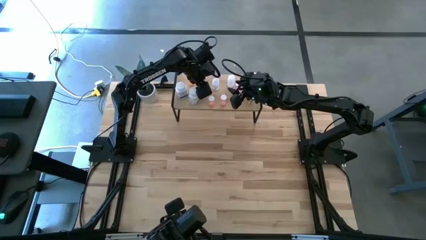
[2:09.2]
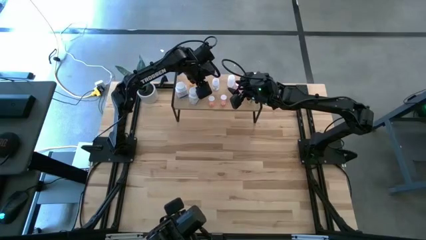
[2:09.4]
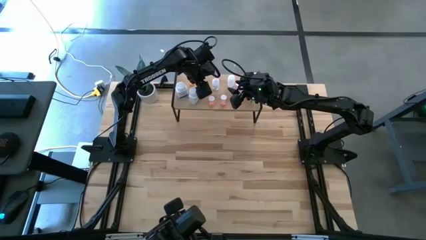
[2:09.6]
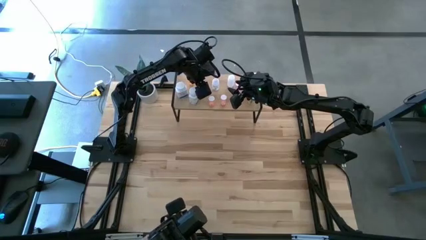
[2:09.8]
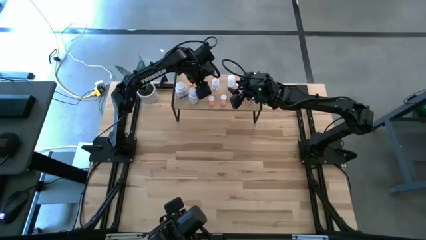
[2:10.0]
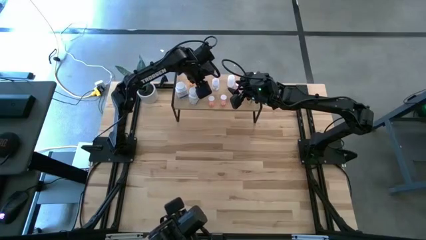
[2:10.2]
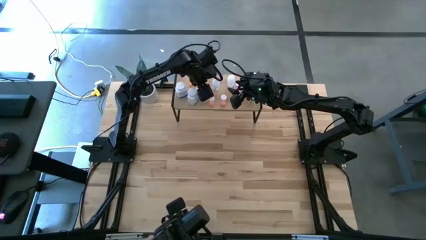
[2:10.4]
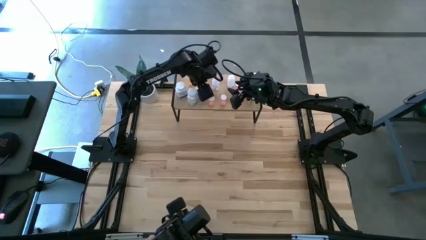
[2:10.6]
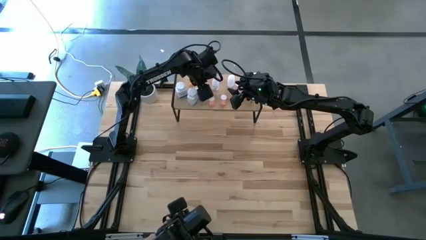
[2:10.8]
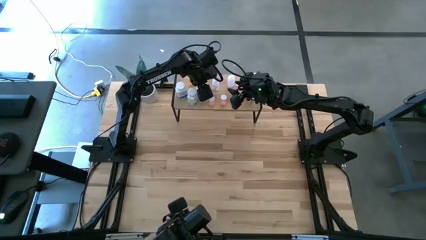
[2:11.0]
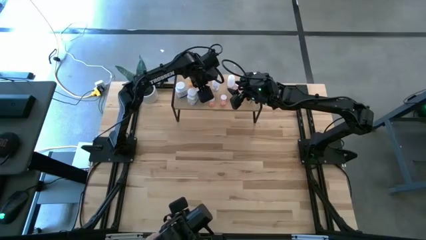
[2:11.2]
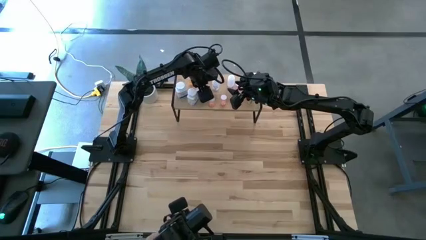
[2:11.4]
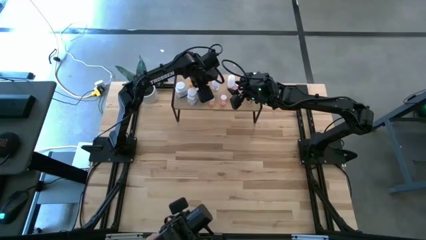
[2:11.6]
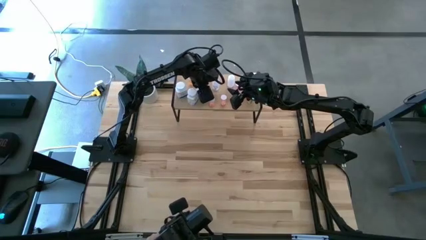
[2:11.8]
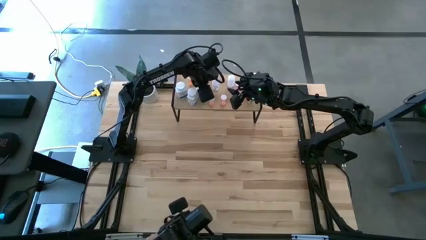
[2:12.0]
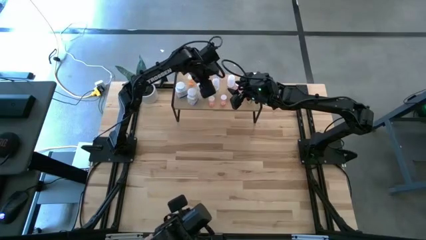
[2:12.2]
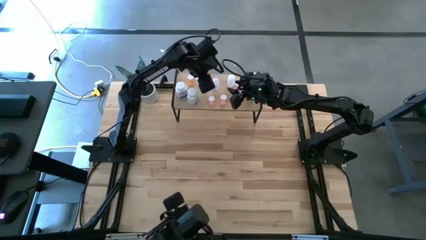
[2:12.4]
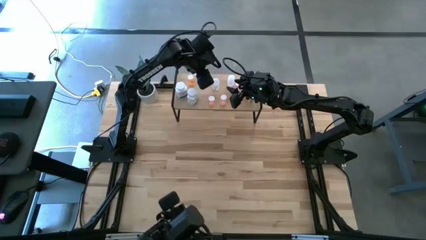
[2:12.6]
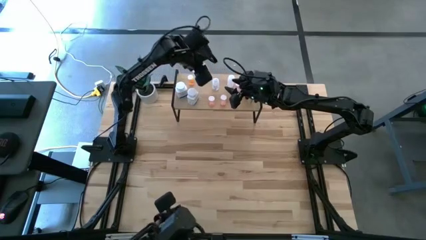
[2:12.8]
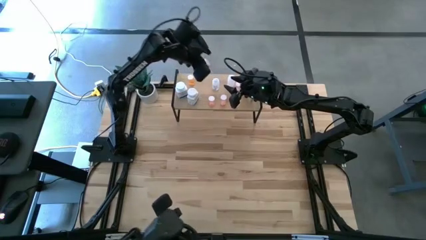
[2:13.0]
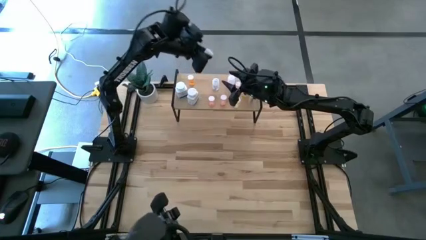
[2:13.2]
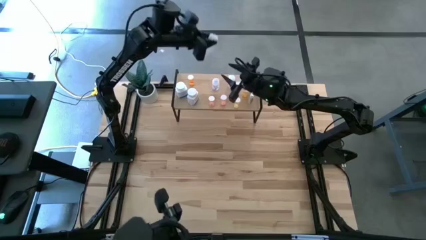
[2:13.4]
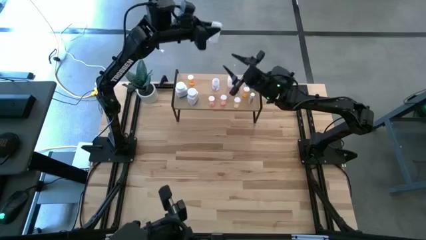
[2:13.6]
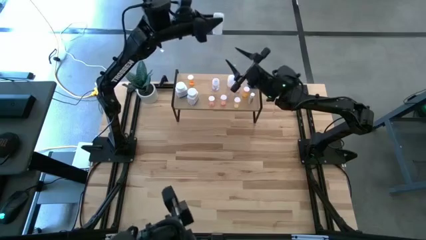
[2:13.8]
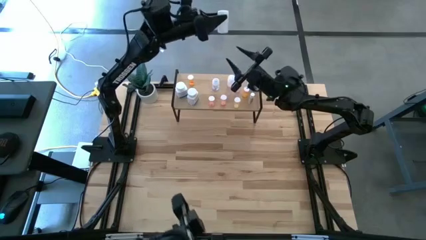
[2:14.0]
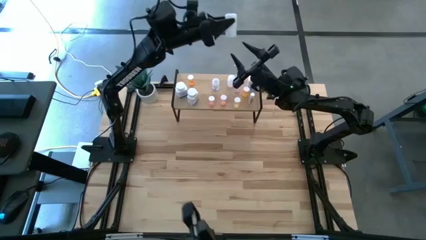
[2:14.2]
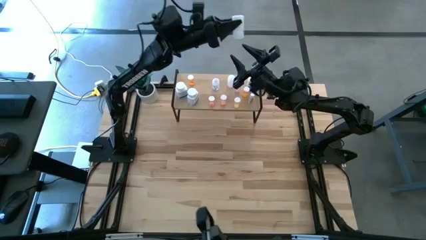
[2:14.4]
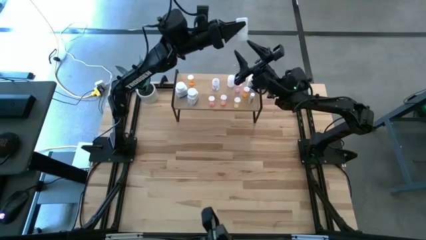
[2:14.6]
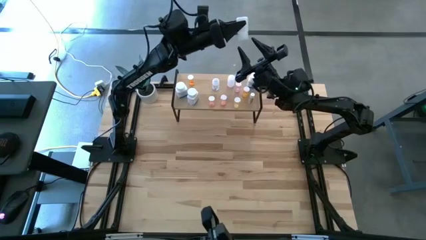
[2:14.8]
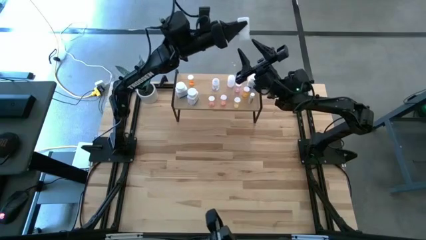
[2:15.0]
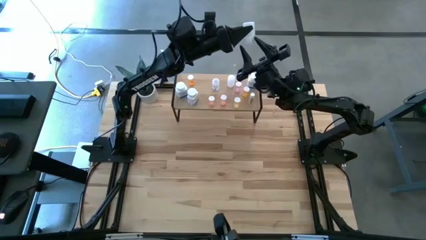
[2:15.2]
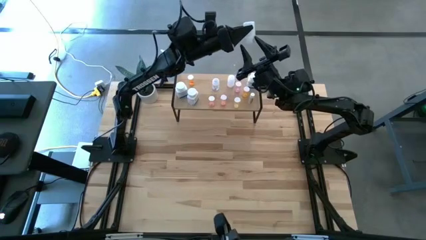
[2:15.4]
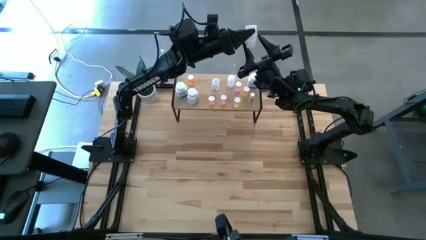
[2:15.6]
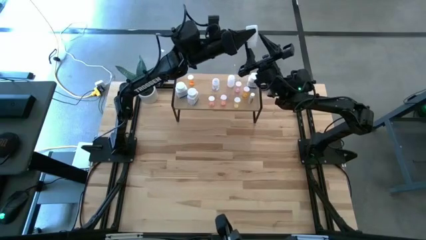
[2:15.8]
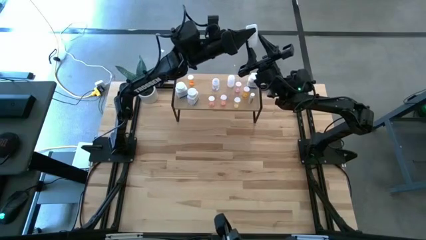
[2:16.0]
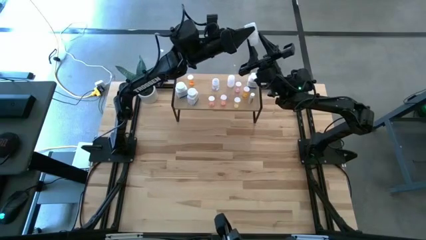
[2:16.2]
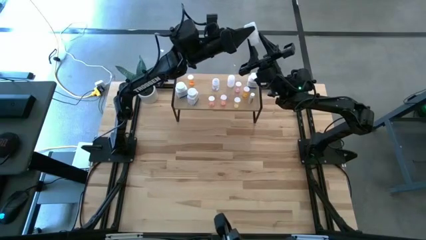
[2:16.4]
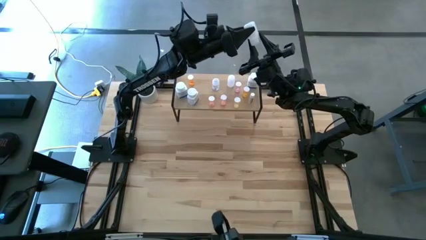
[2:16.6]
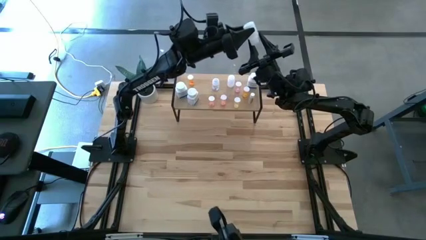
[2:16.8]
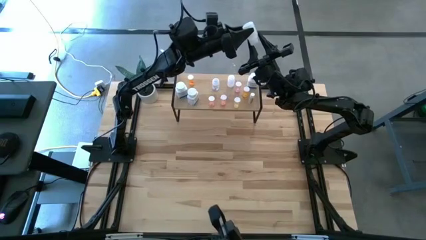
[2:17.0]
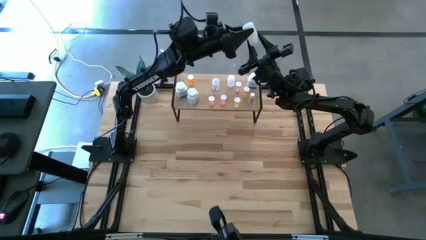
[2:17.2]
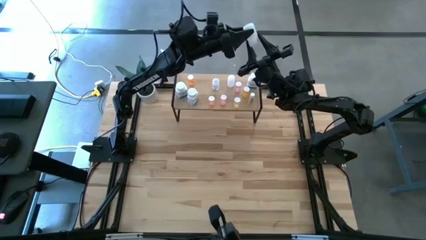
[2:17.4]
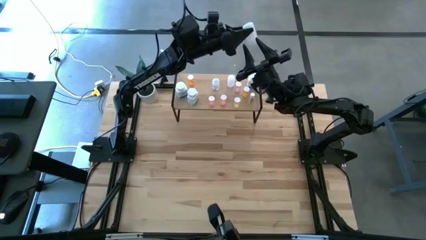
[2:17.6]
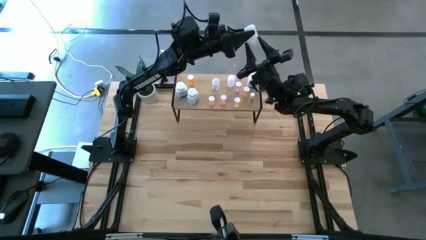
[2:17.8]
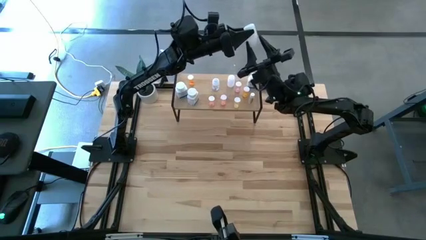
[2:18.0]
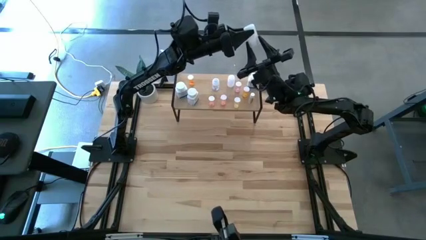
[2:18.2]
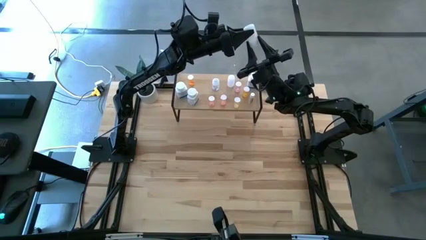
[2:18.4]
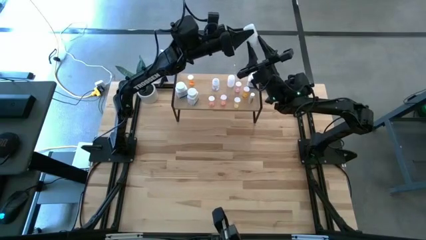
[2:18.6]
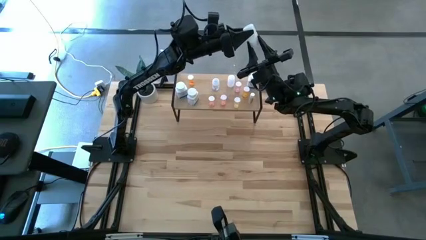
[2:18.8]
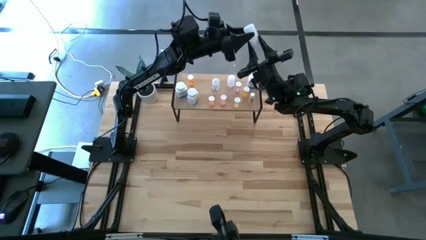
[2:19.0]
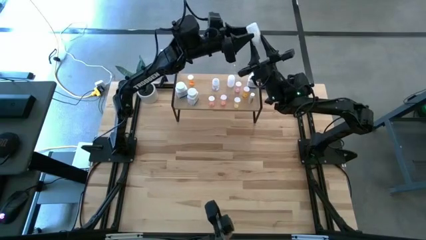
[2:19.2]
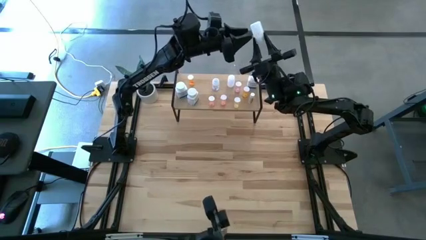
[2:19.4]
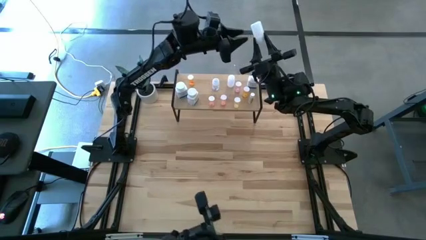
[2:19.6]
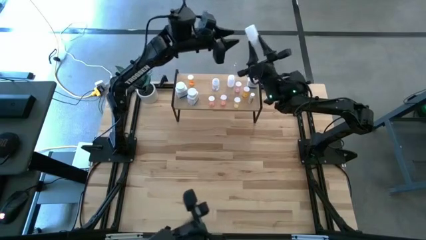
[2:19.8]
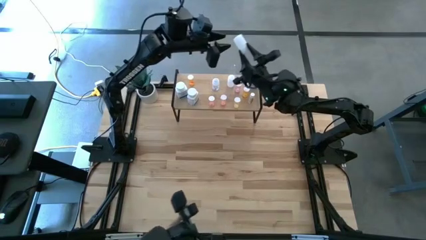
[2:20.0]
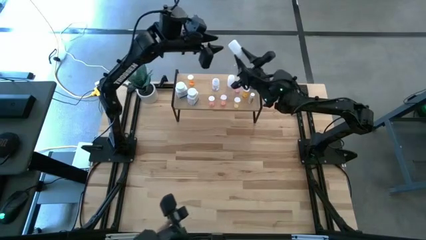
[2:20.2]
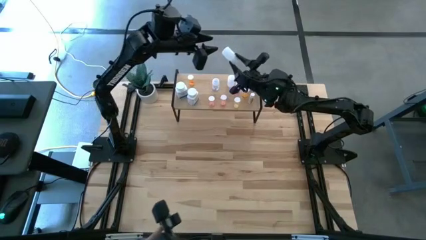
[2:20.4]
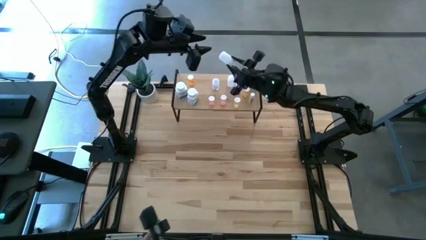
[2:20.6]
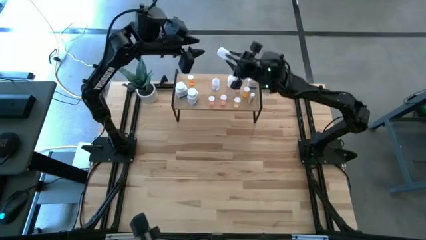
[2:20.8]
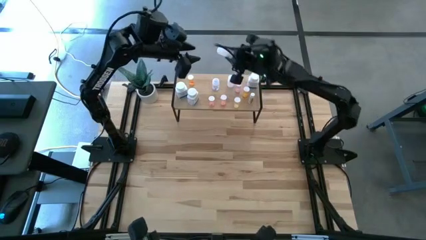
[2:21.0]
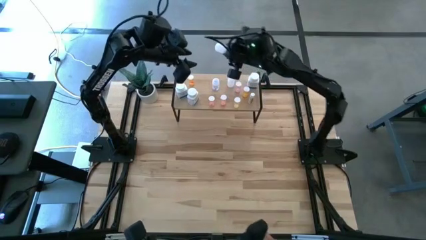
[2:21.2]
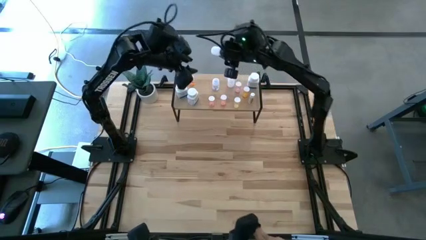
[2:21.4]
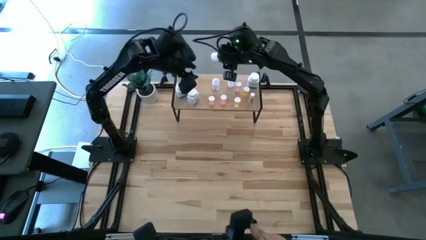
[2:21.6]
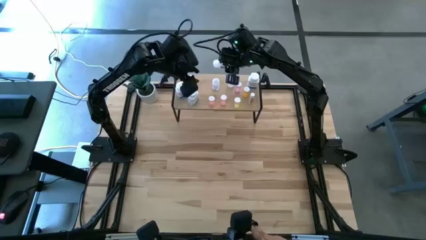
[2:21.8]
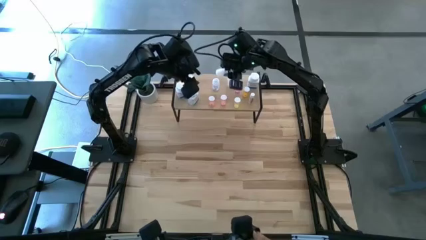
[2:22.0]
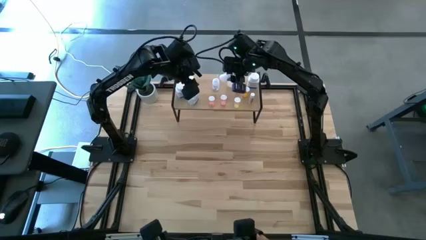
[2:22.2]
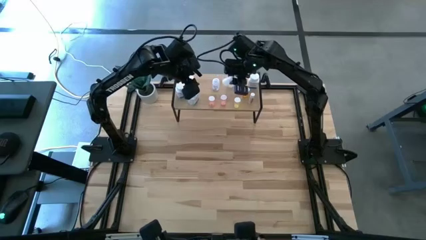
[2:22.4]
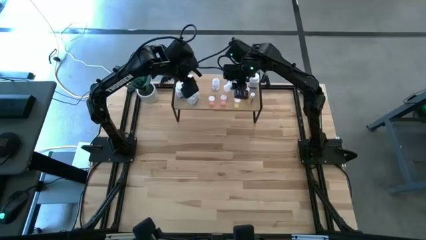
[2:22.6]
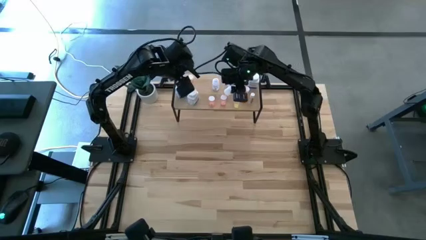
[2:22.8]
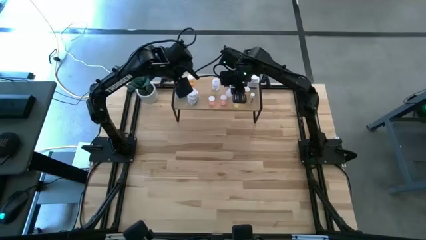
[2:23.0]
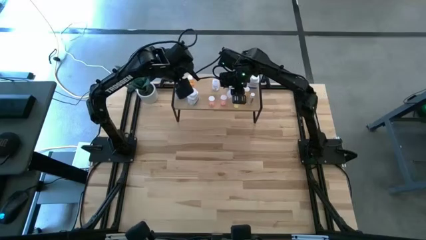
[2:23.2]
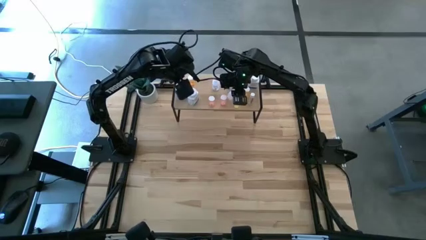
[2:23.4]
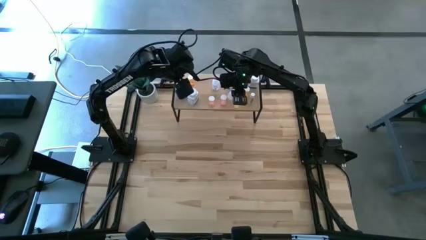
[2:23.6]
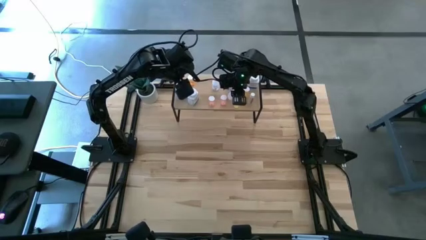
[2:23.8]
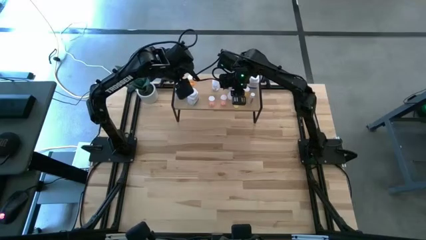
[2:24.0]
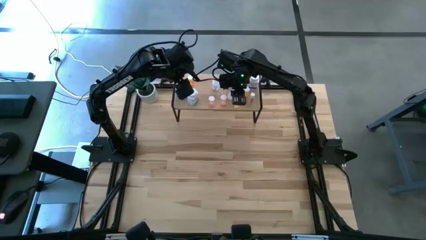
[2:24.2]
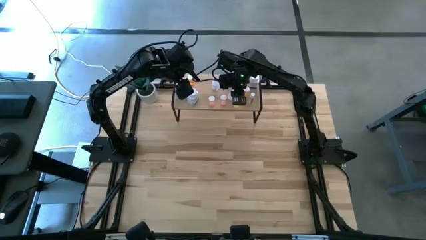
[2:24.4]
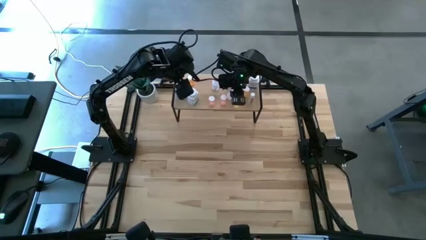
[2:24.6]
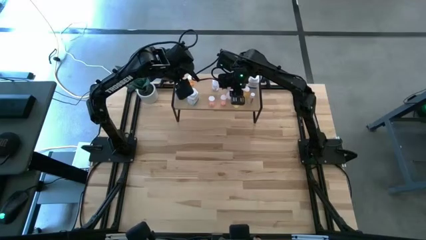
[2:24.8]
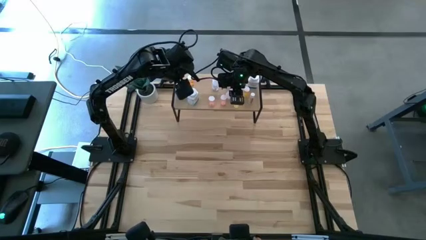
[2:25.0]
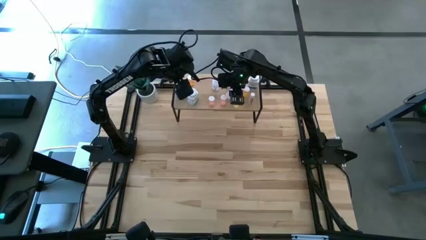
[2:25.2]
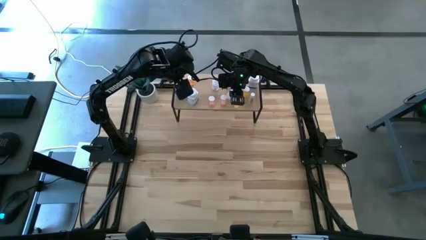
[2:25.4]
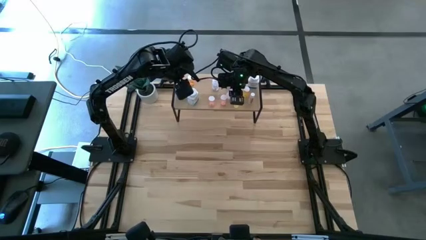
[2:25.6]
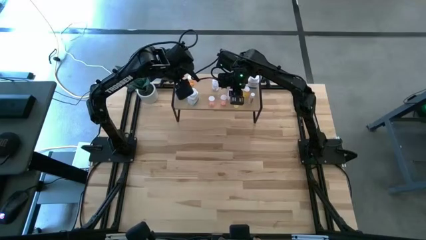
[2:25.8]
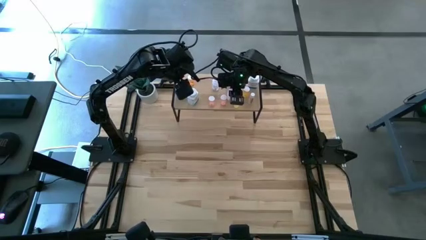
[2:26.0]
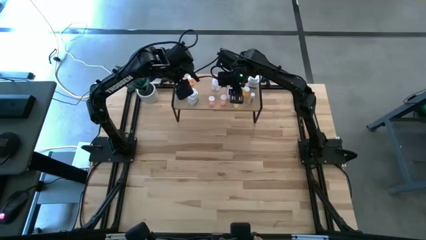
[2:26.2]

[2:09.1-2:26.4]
Task: Pick and place medicine bottles onto shelf by color
Adjust the white pill bottle on the shelf
